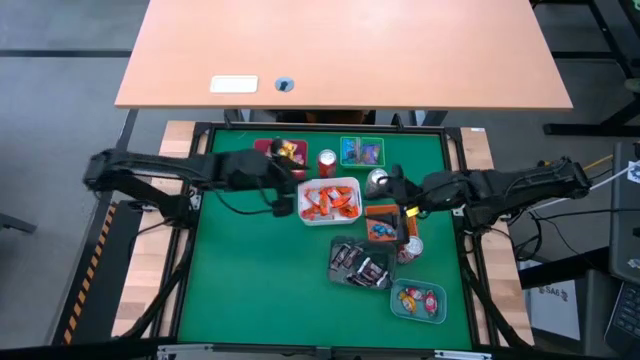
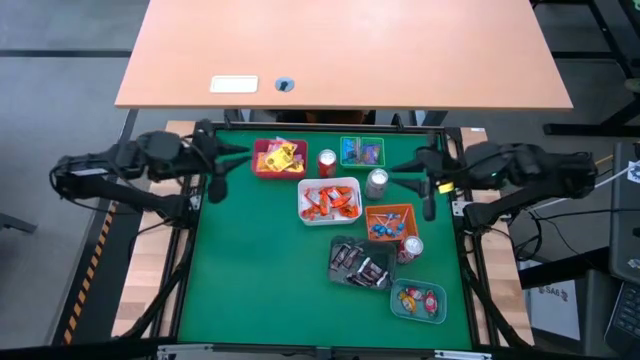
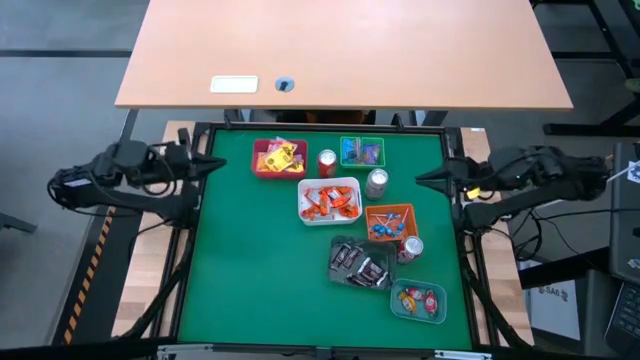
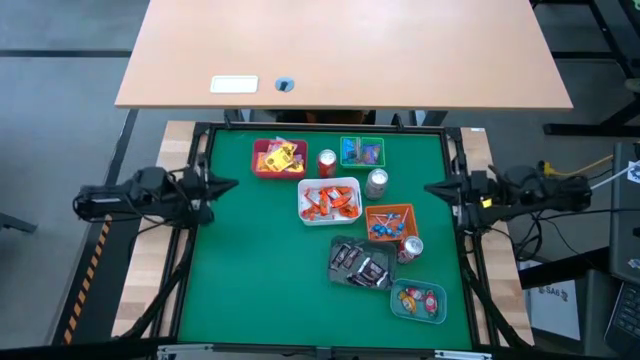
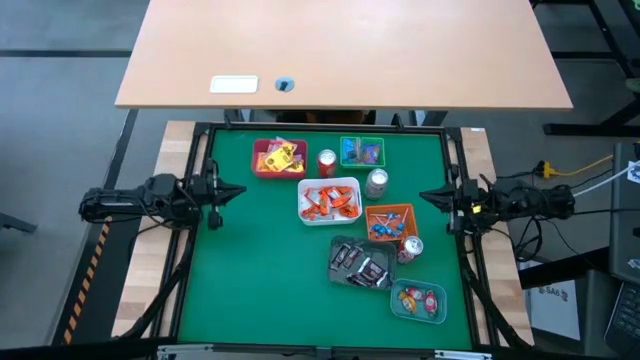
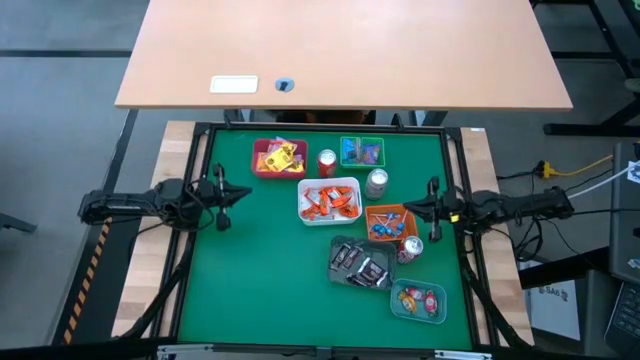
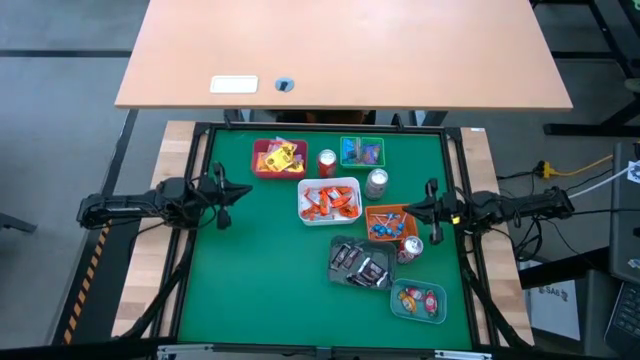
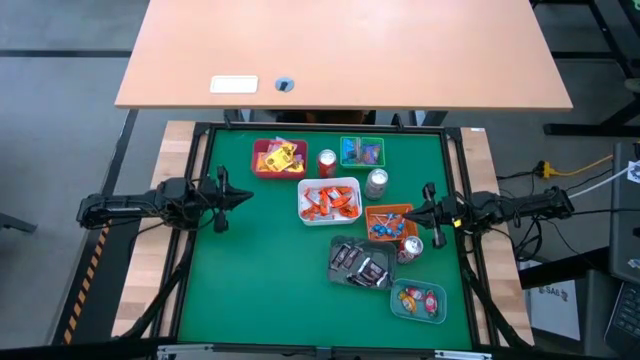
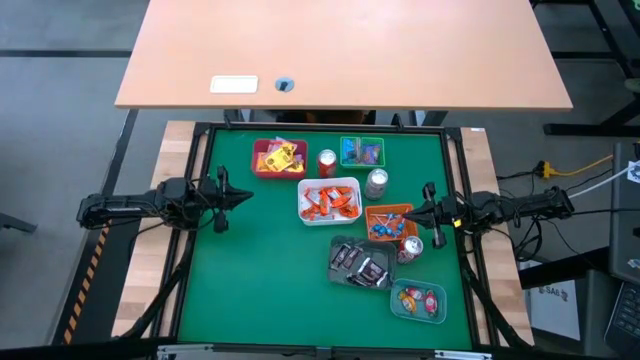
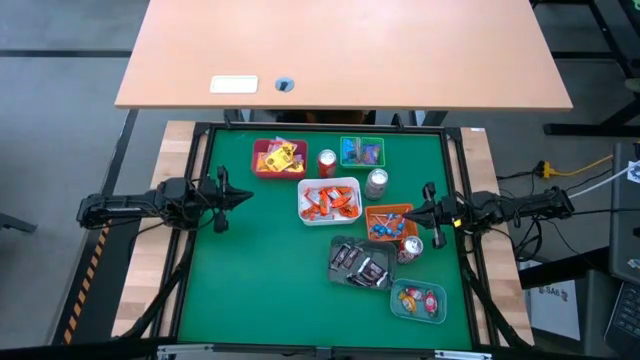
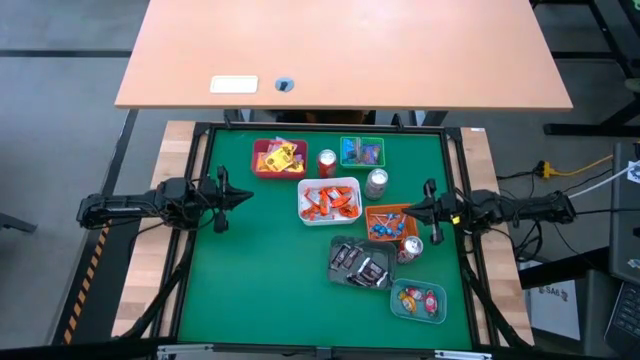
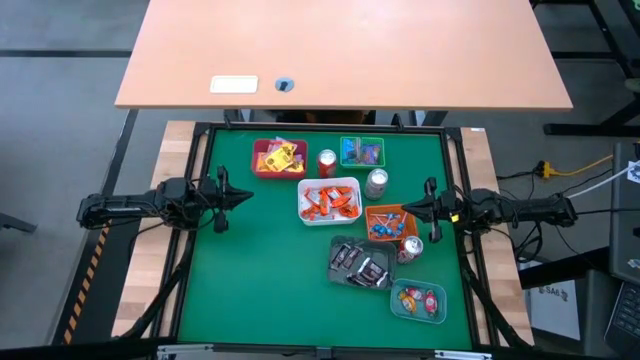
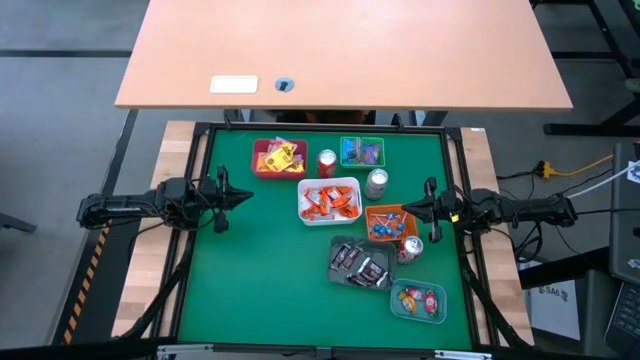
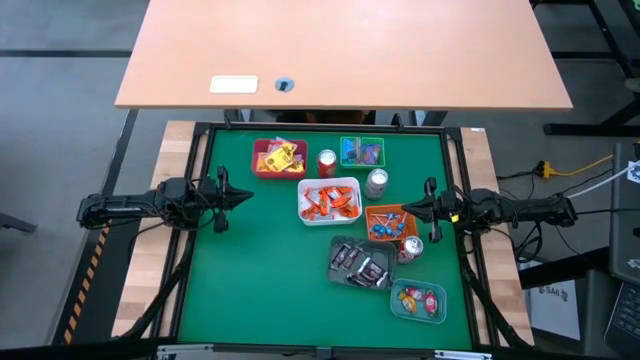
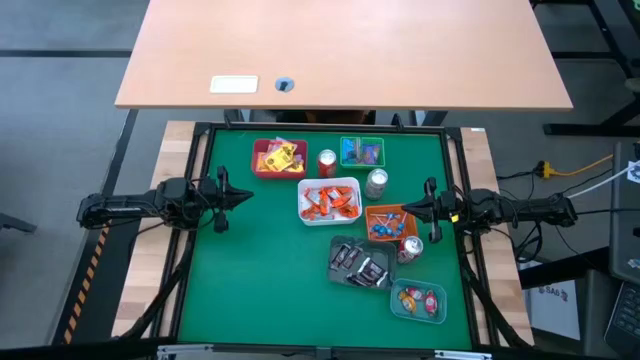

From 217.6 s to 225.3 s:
Task: Sort candy
Return to Home Position

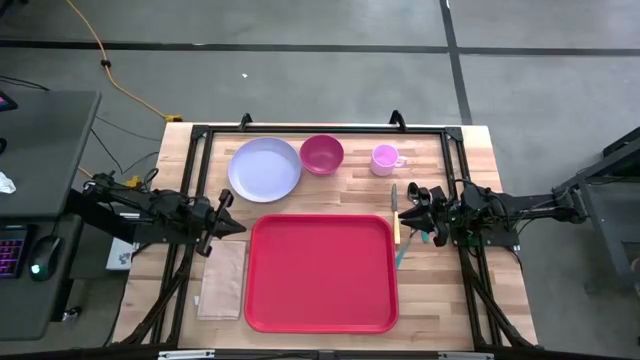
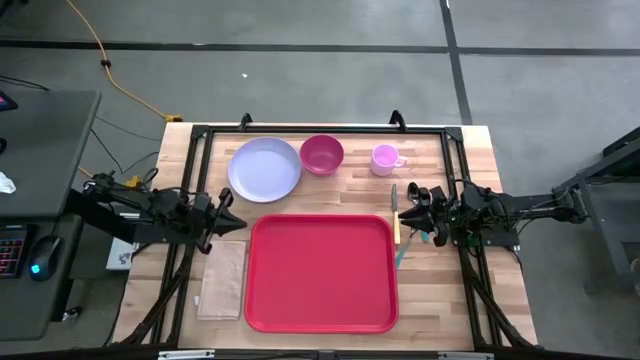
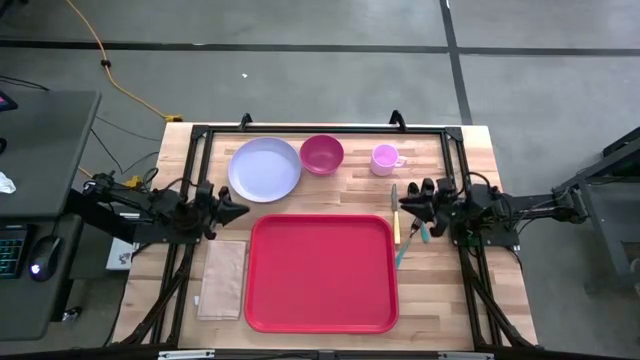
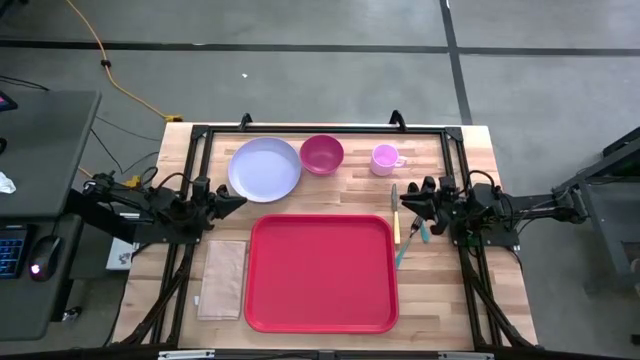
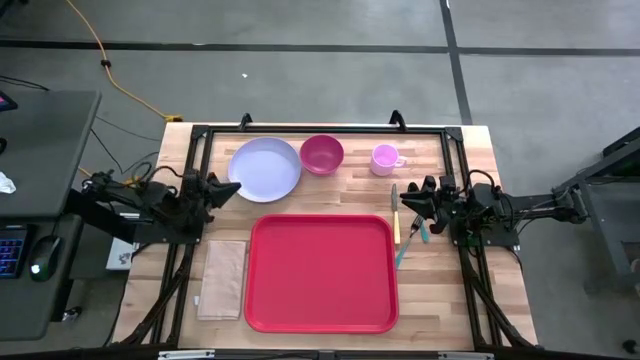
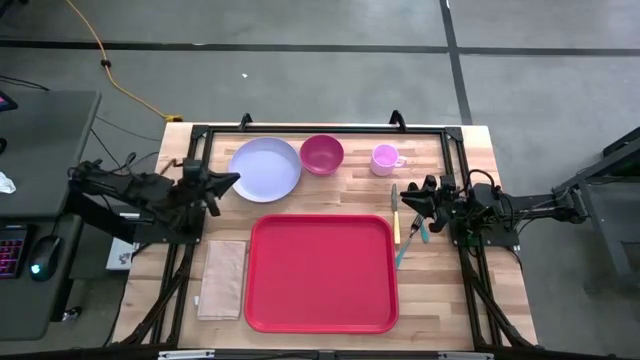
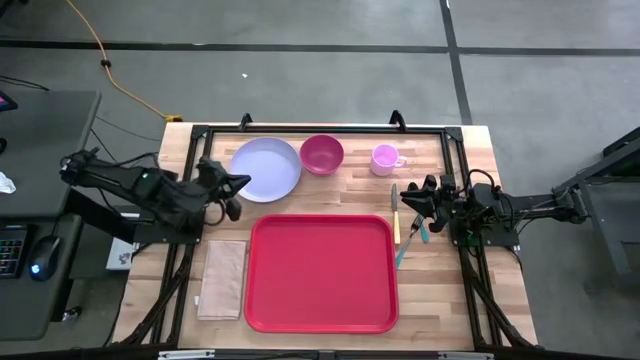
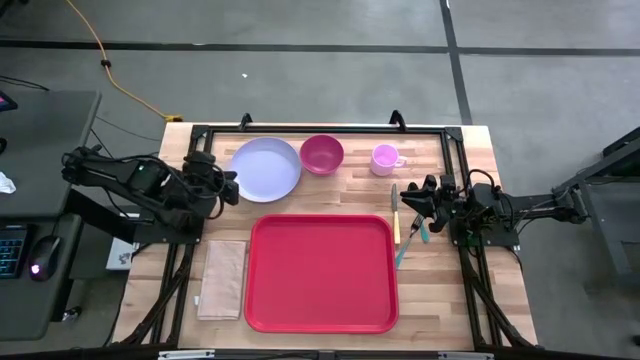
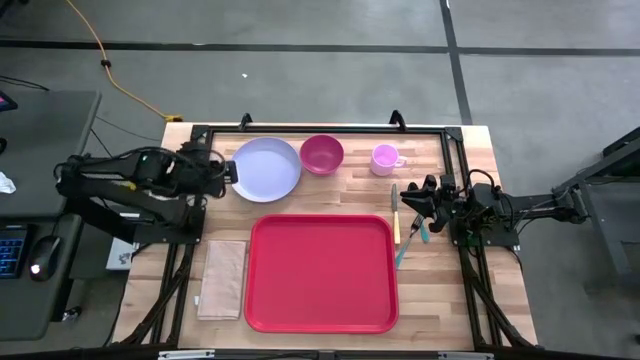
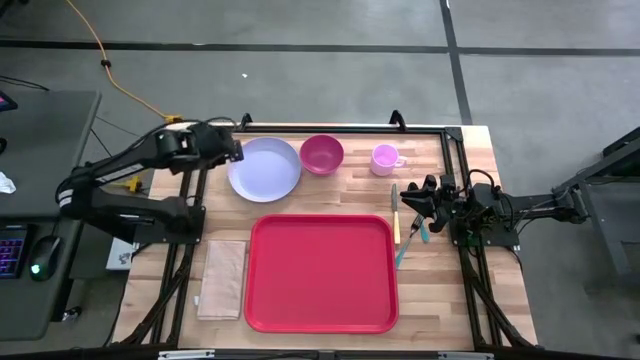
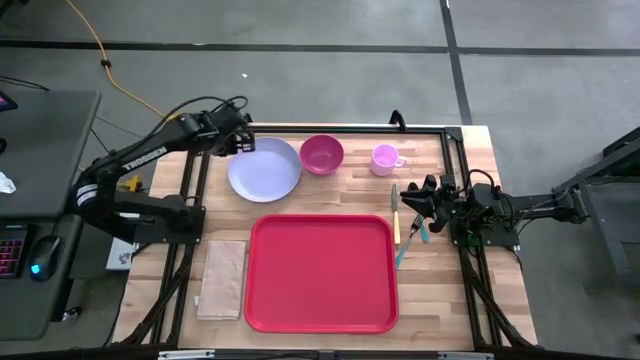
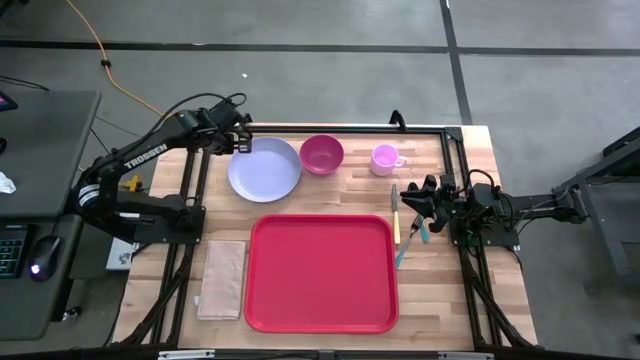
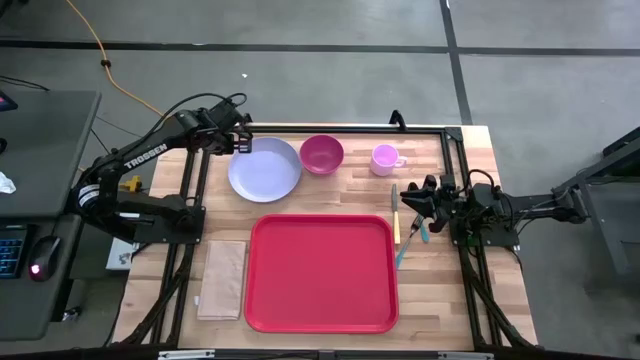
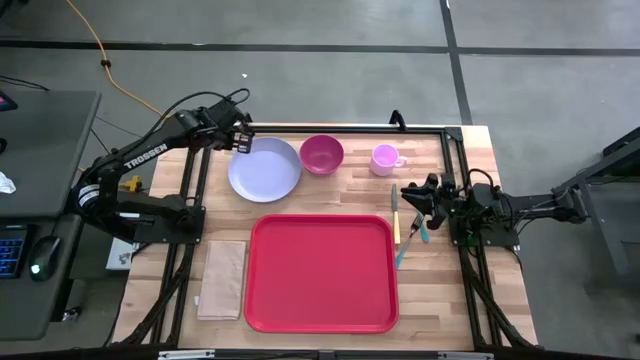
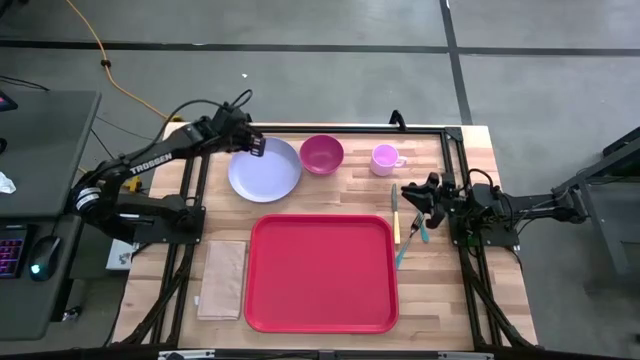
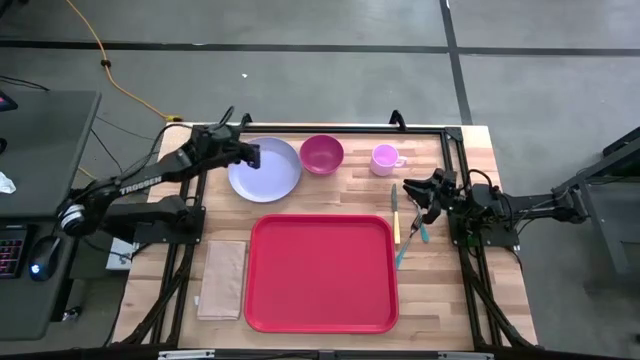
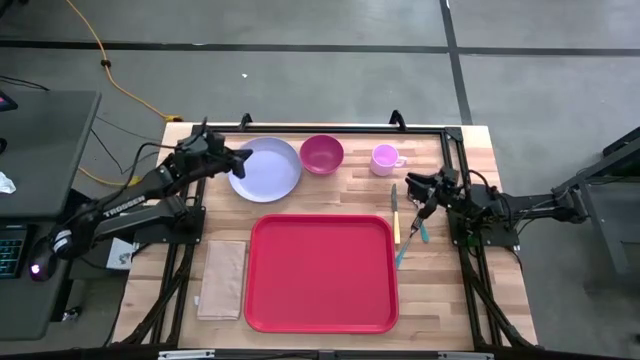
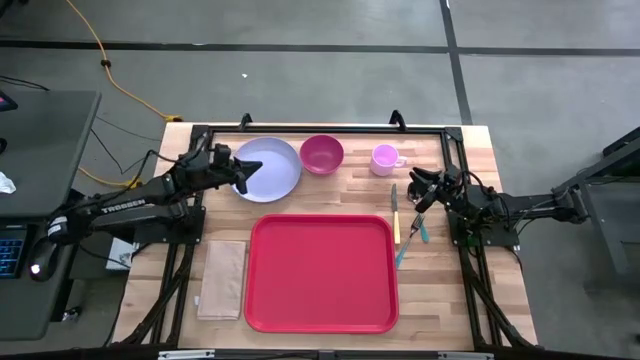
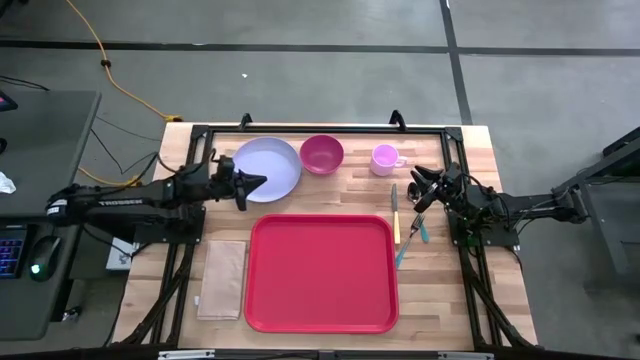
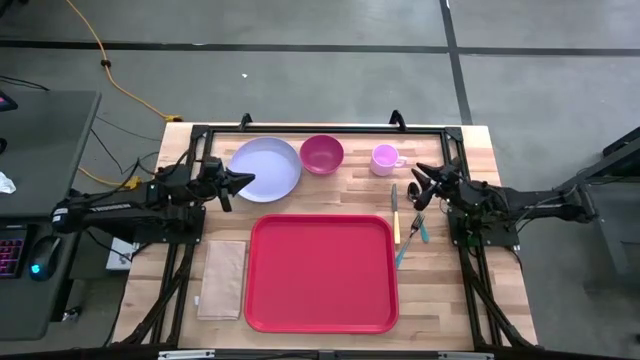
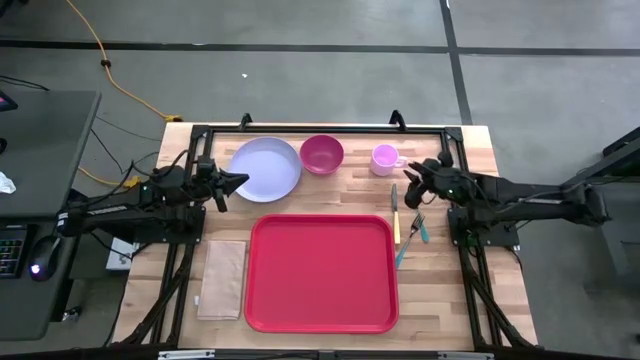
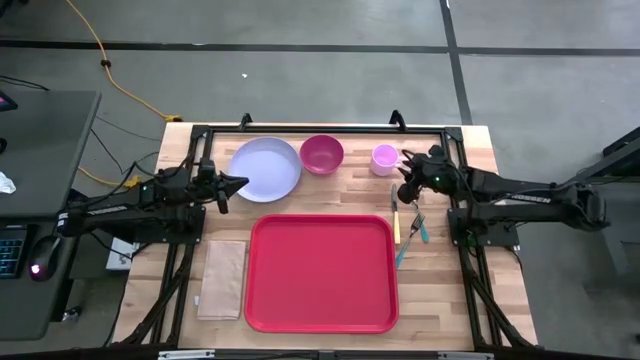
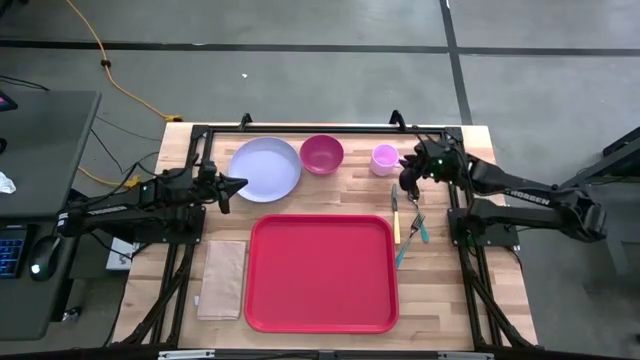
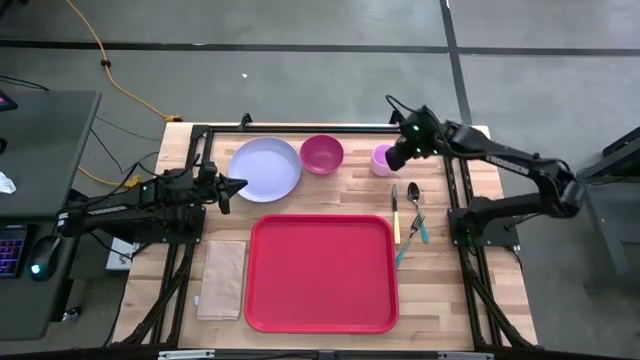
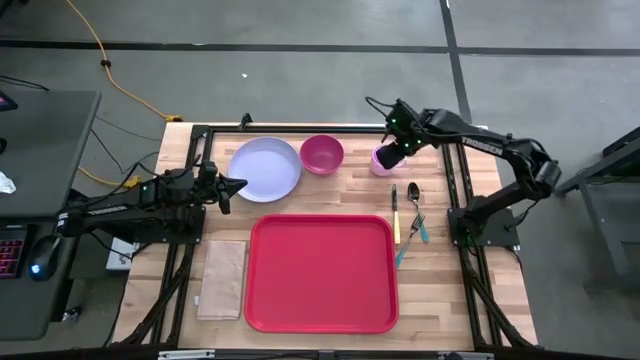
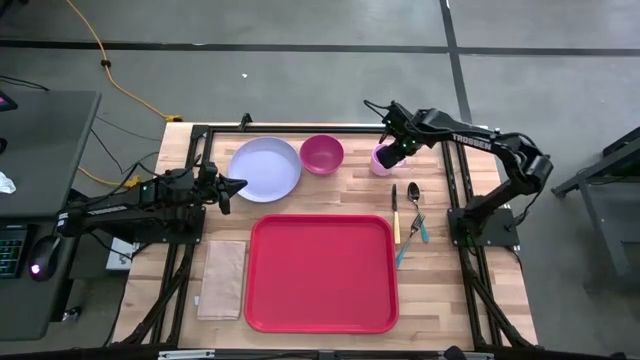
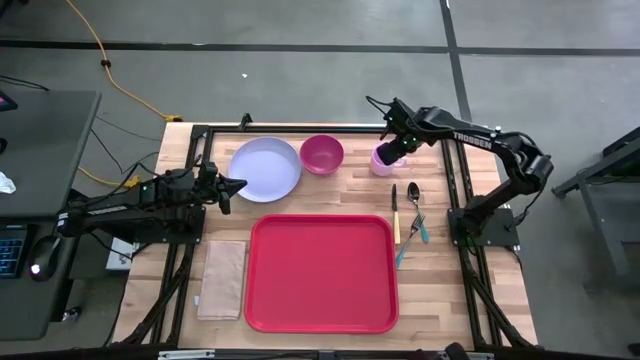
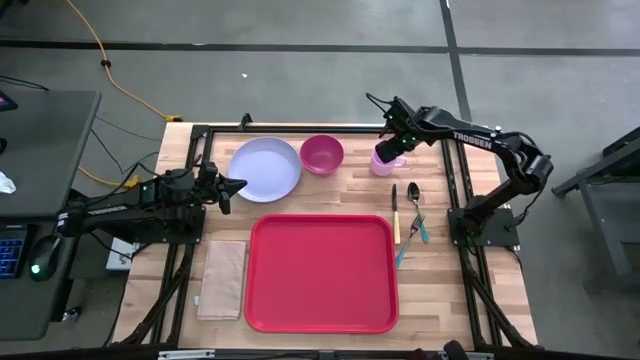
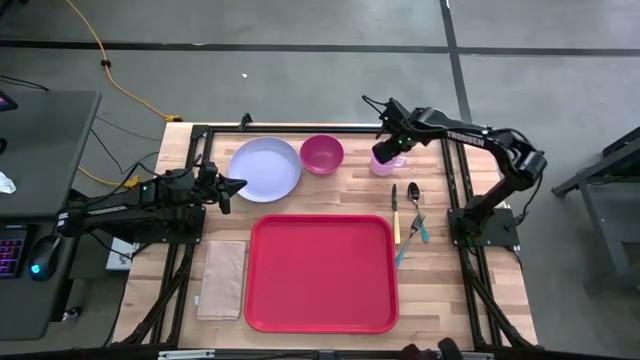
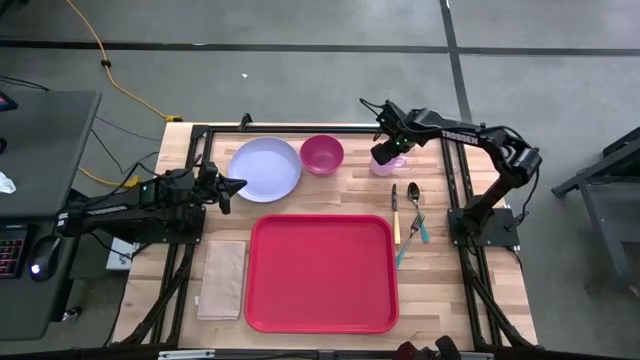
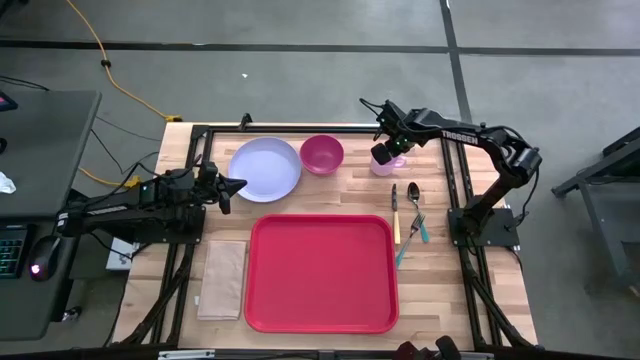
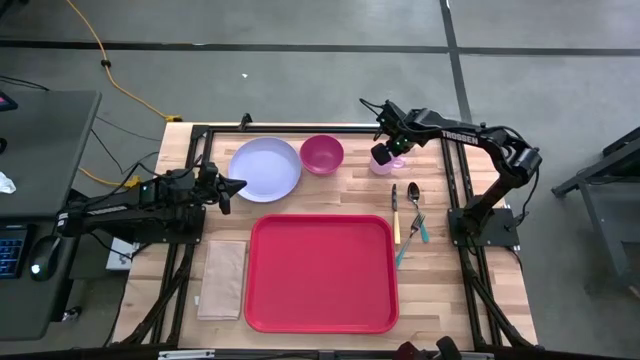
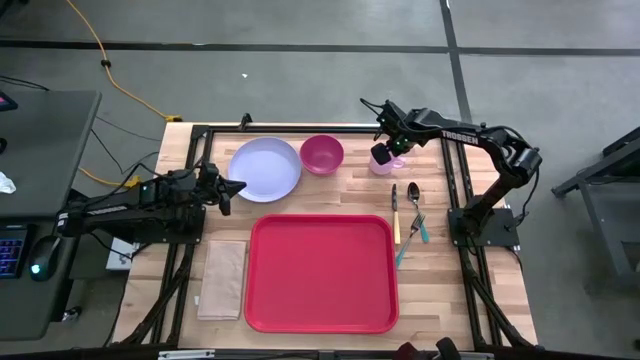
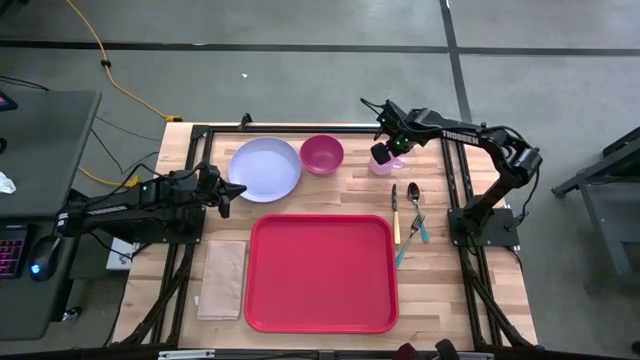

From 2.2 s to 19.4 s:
Task: Set up tray
Put the pink mug on the red serving tray
